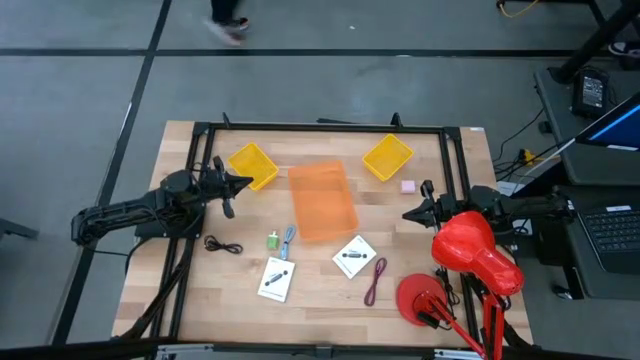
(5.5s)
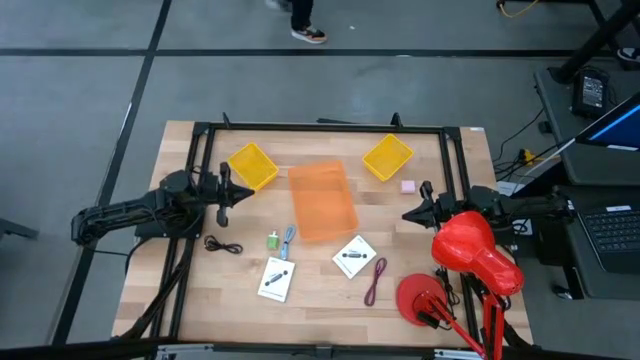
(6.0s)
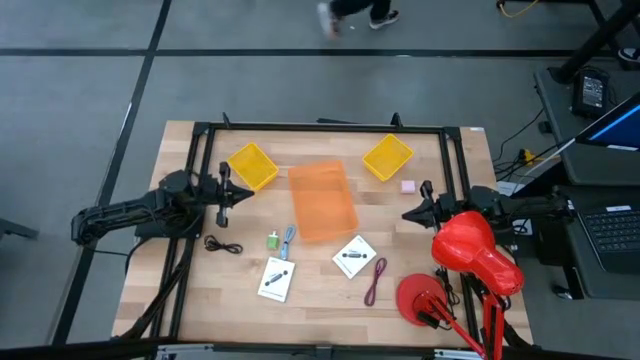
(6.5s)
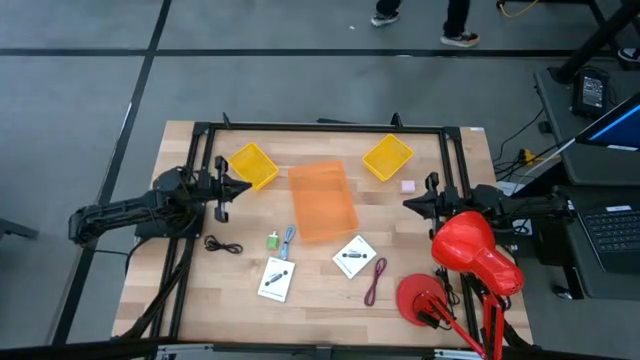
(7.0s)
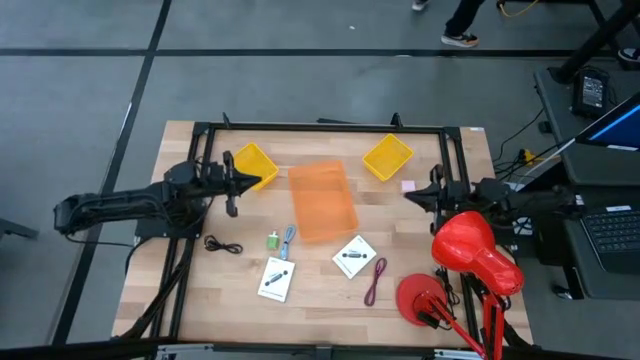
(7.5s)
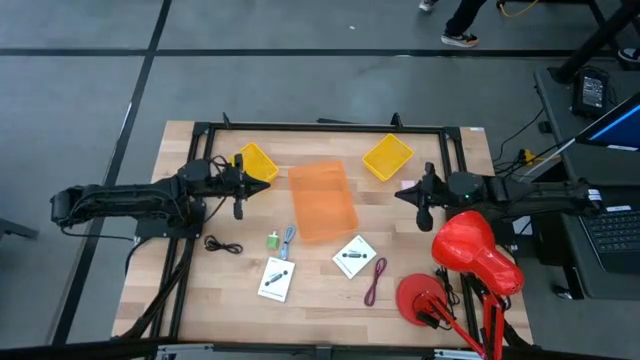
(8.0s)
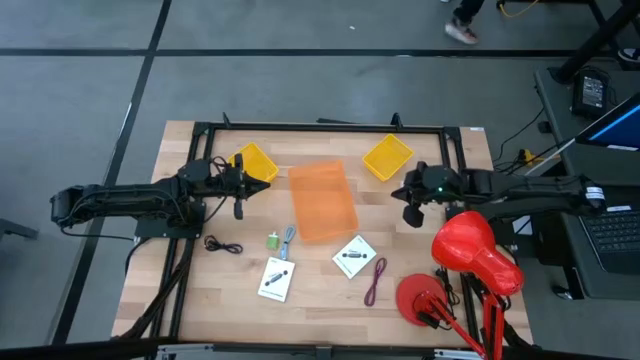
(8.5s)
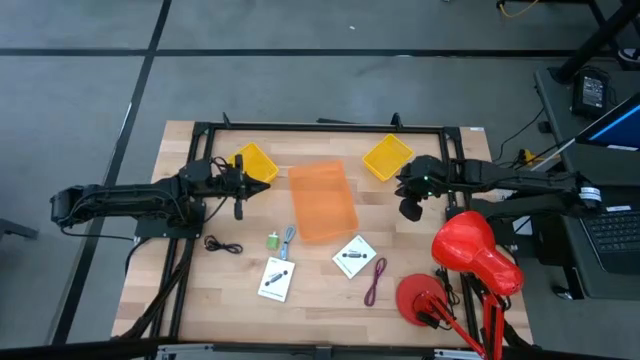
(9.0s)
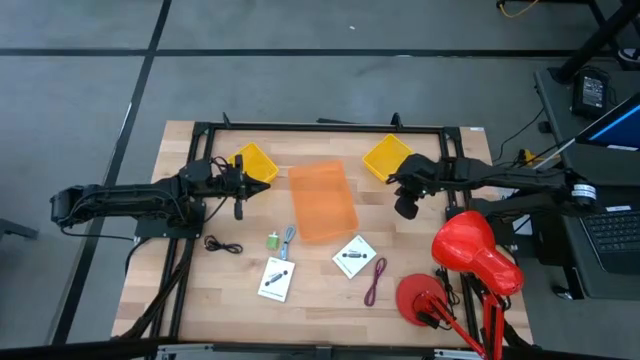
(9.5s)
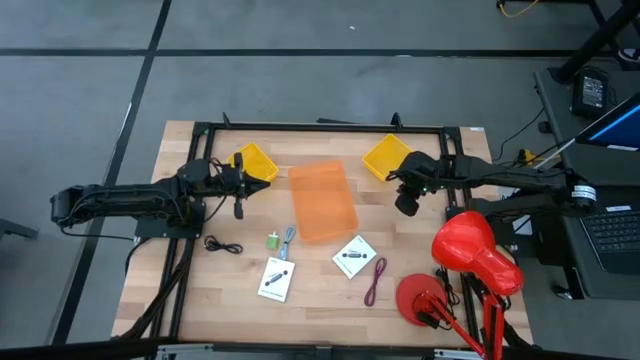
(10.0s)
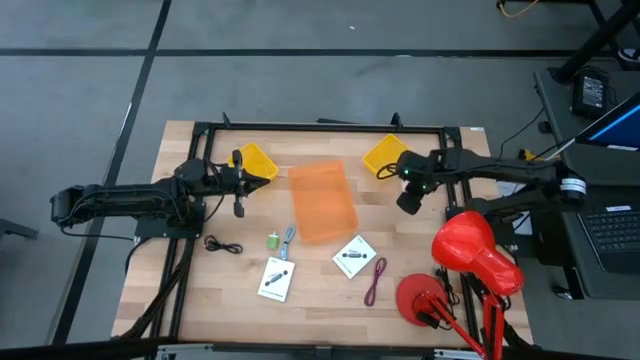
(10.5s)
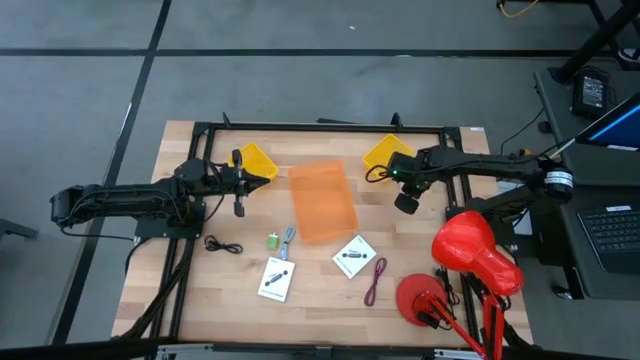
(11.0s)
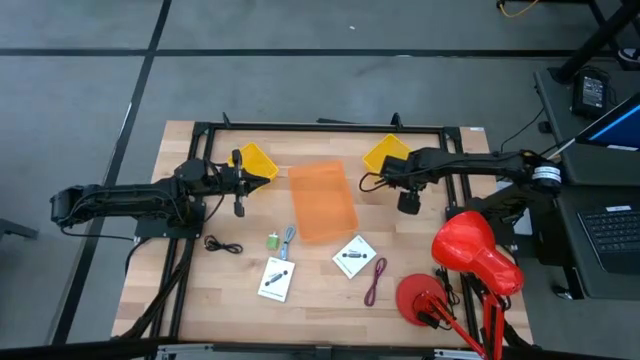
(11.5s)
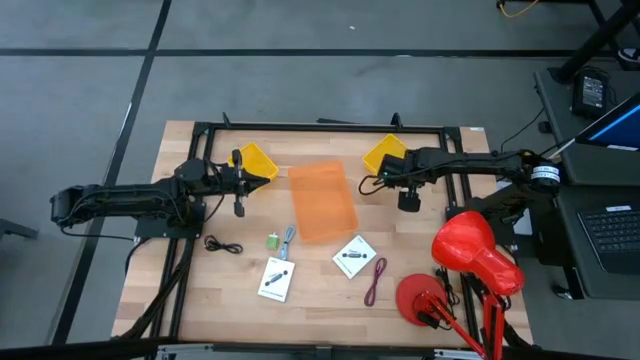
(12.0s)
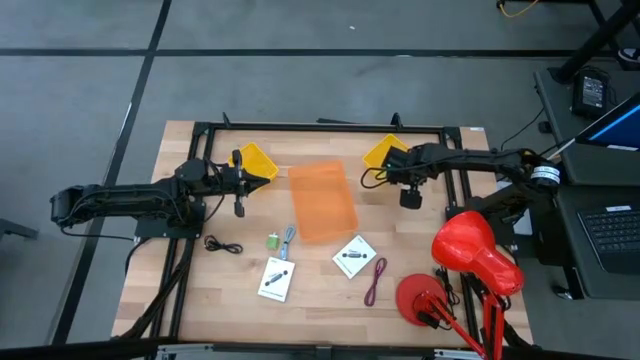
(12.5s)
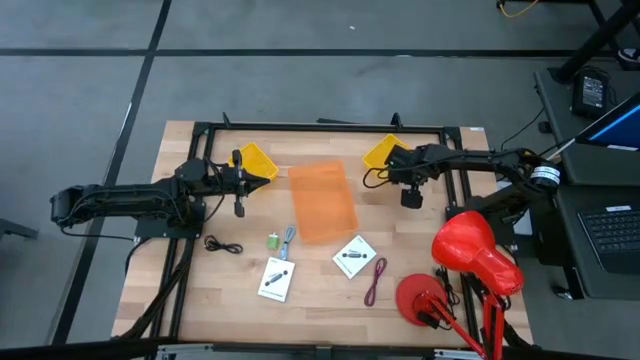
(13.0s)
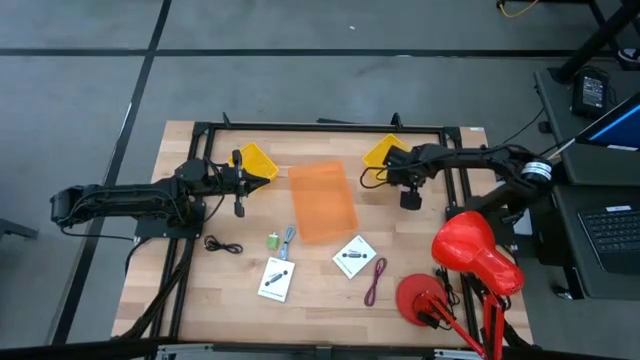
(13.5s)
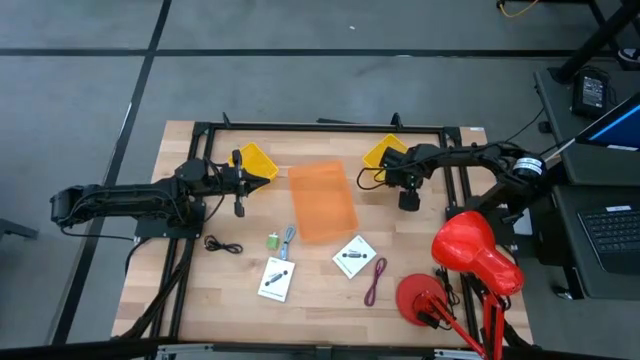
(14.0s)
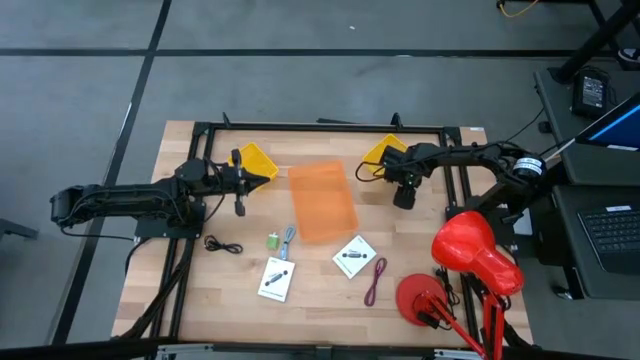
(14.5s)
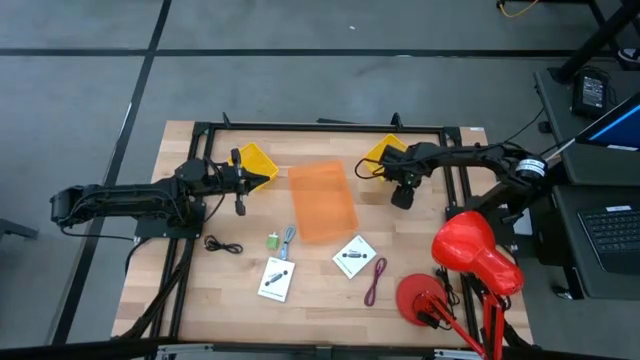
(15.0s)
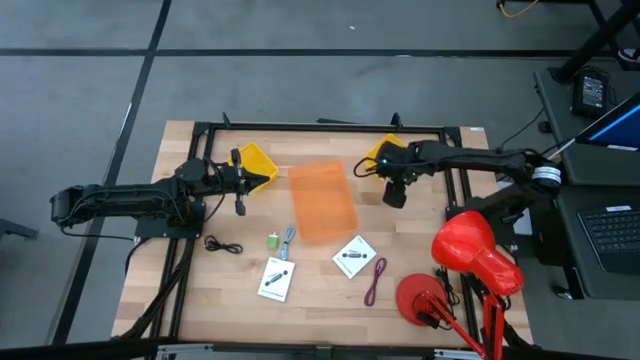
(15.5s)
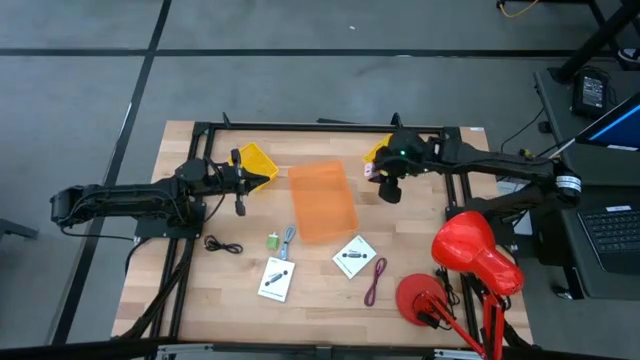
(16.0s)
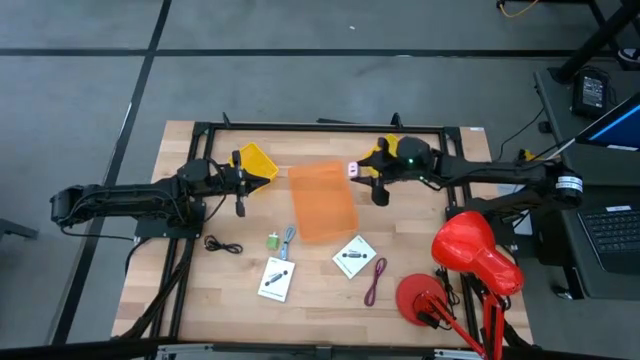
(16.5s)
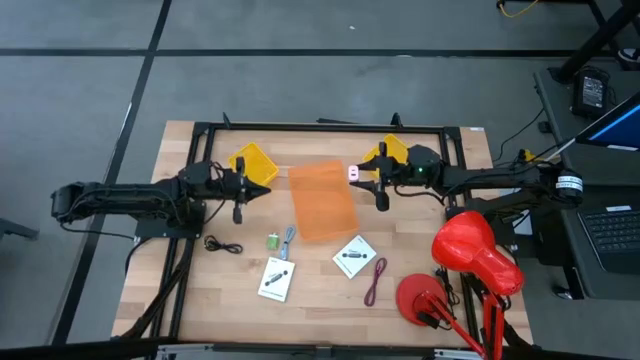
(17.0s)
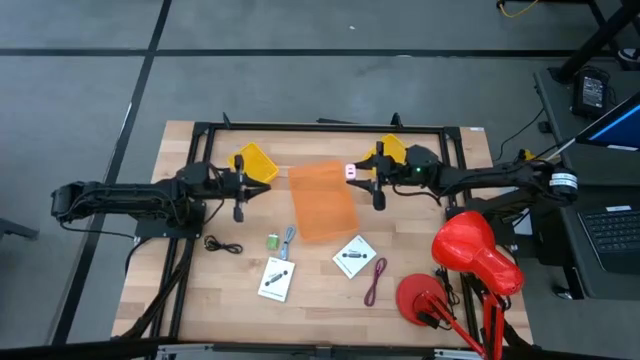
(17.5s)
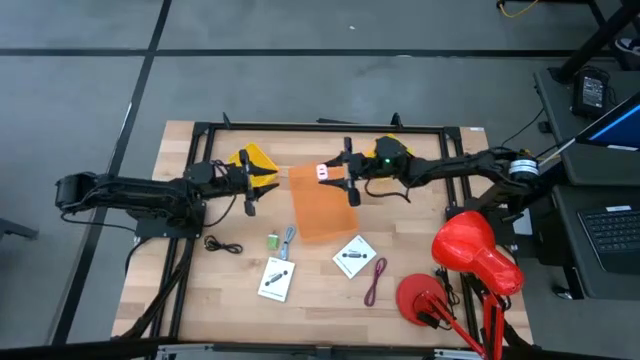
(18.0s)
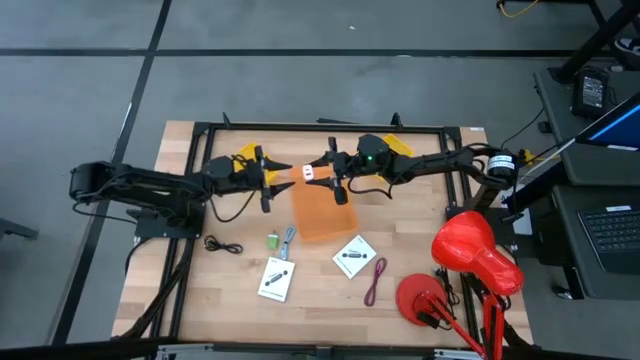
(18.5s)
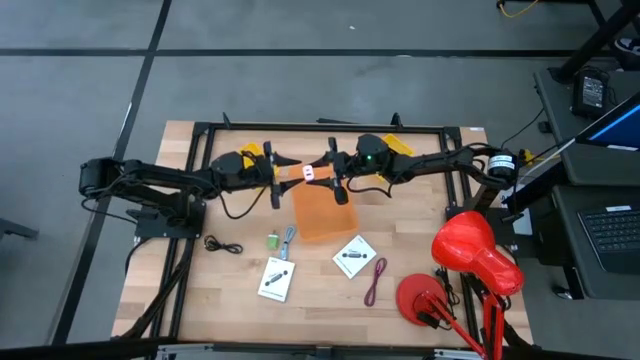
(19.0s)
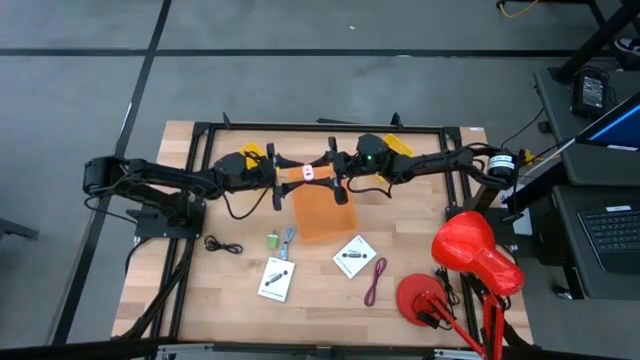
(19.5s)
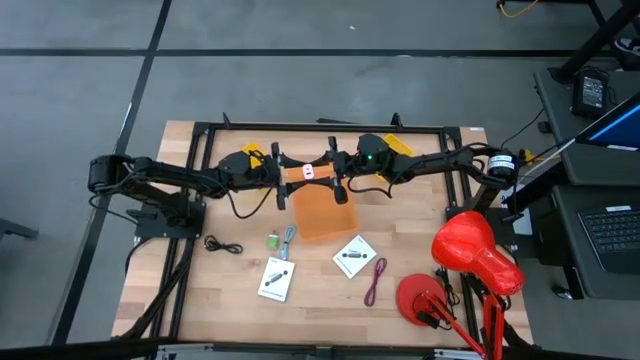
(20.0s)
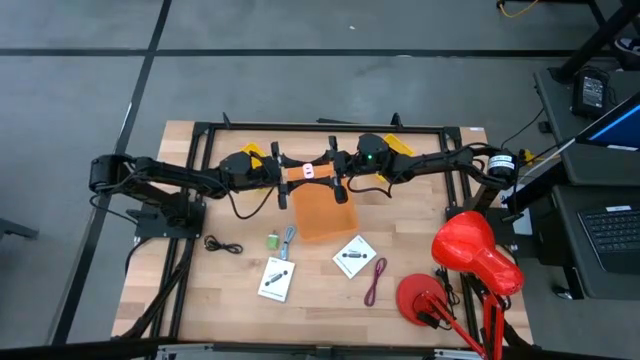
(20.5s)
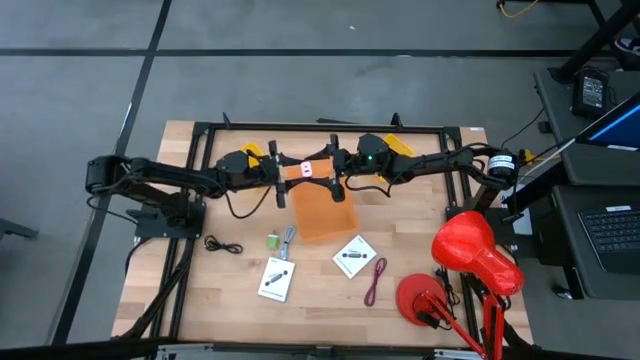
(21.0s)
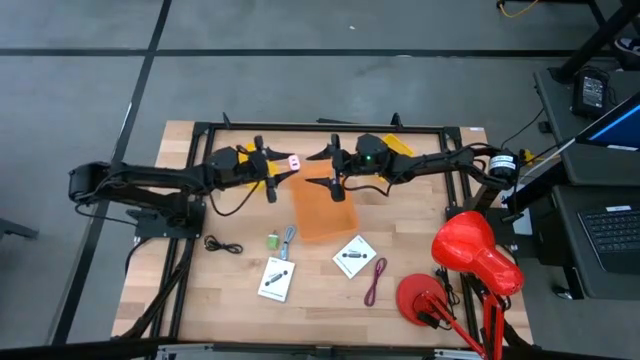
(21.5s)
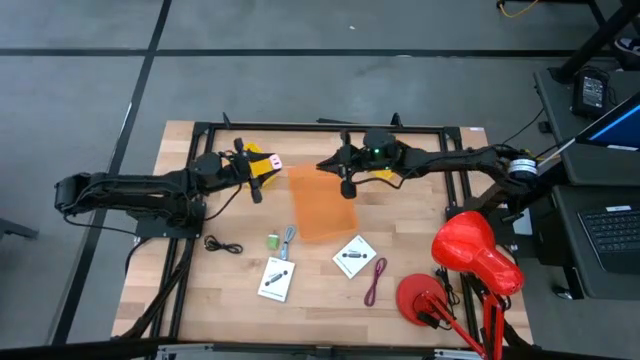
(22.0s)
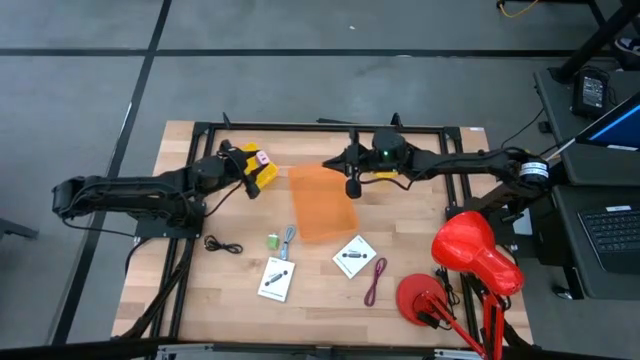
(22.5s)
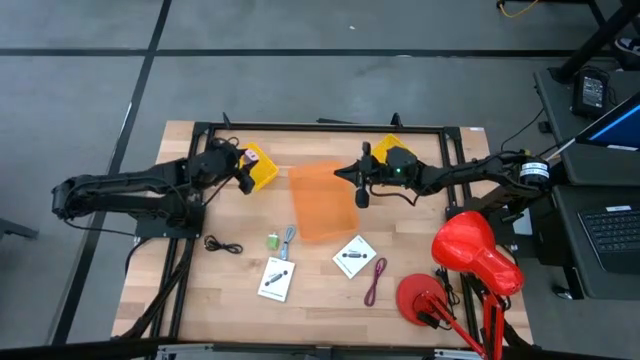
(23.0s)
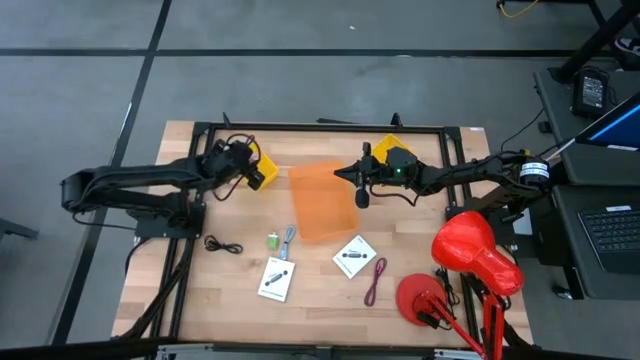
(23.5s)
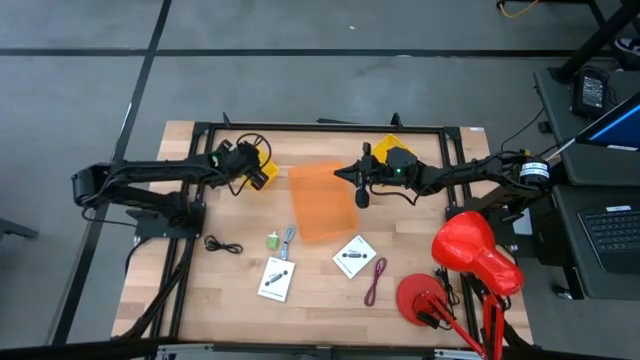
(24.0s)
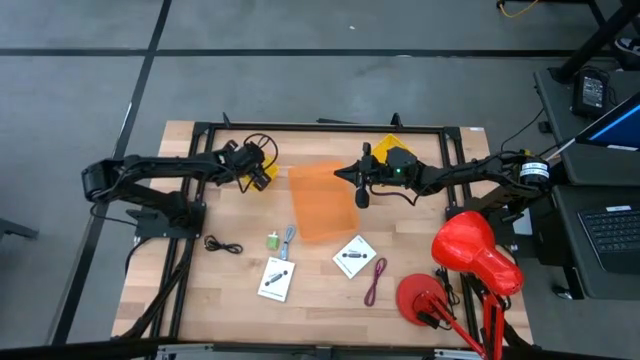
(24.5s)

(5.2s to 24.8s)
Task: Pick and place items into bin
Put the pink charger adapter into the left yellow bin
